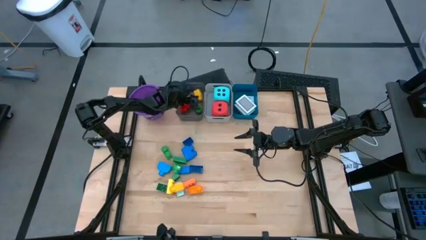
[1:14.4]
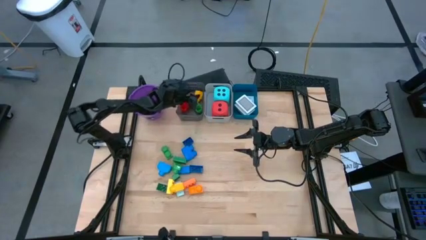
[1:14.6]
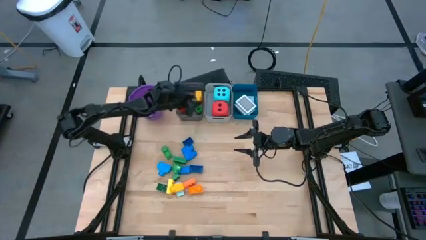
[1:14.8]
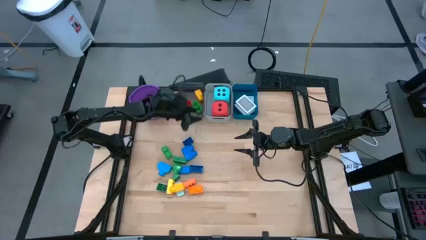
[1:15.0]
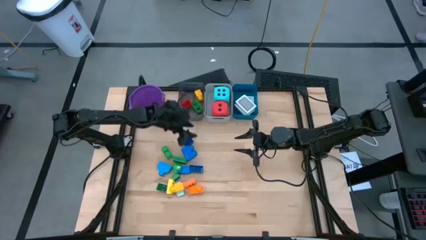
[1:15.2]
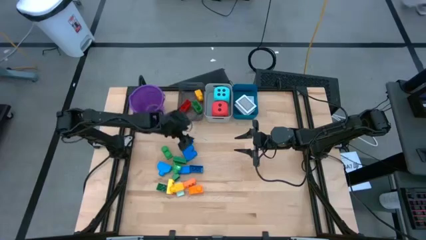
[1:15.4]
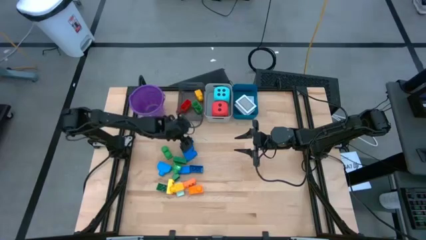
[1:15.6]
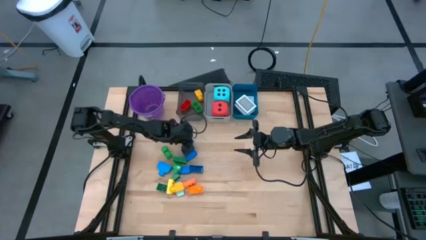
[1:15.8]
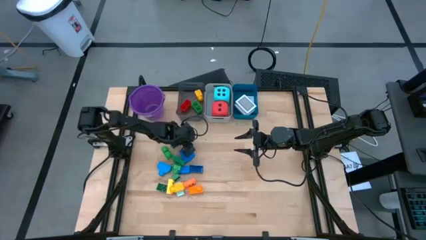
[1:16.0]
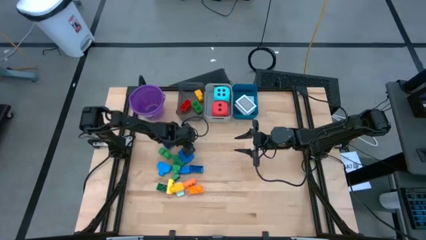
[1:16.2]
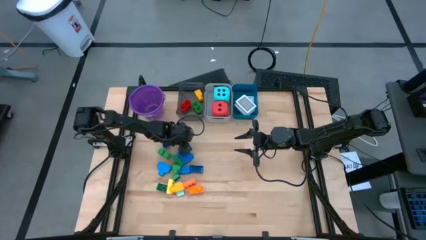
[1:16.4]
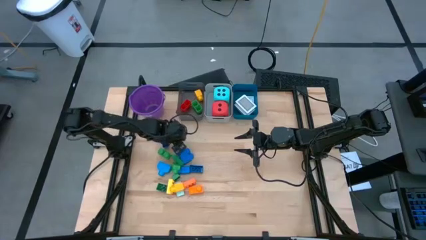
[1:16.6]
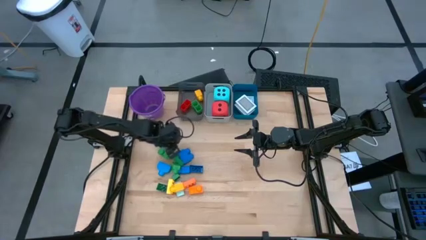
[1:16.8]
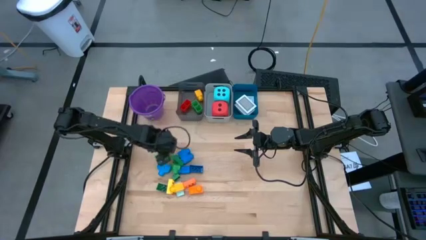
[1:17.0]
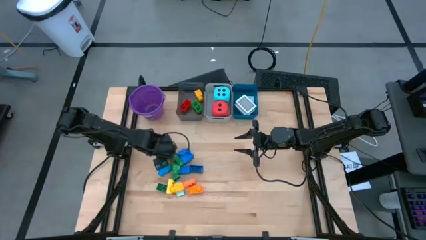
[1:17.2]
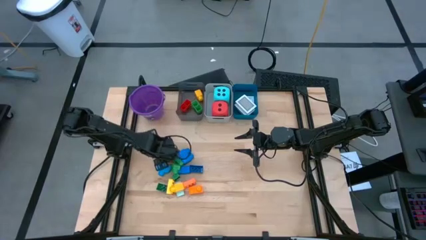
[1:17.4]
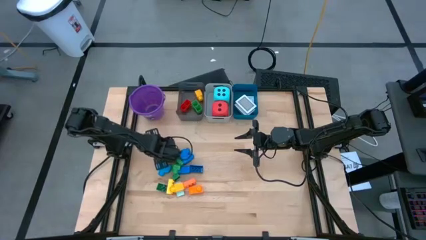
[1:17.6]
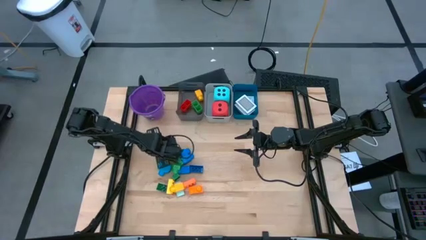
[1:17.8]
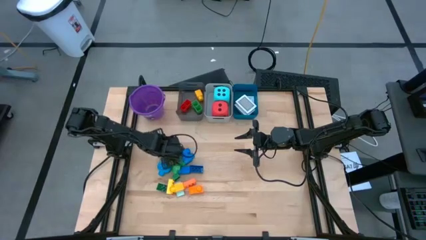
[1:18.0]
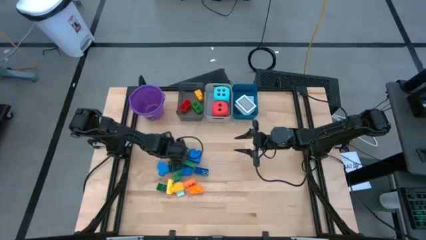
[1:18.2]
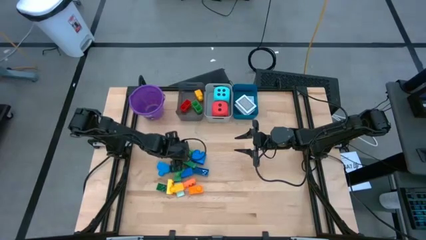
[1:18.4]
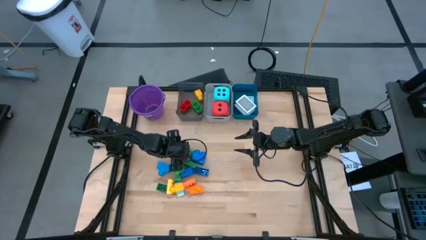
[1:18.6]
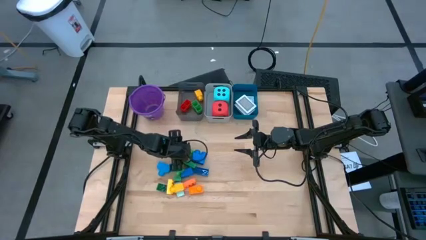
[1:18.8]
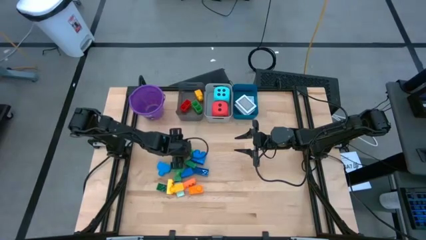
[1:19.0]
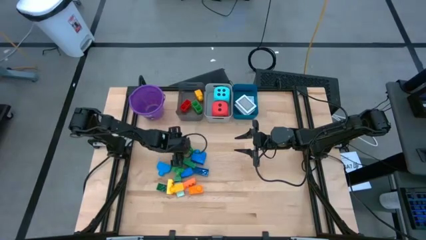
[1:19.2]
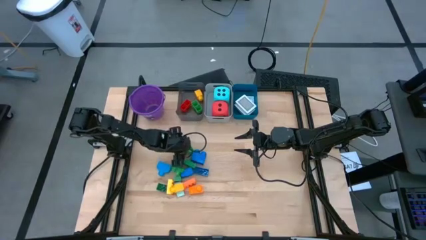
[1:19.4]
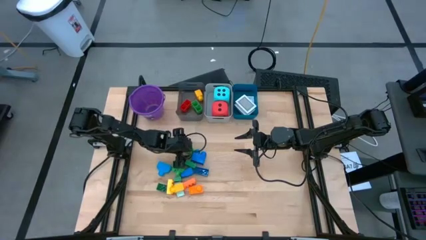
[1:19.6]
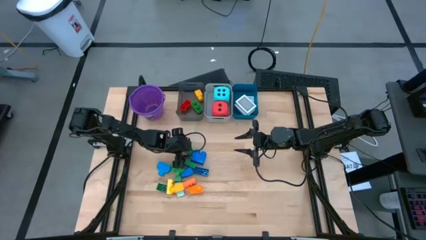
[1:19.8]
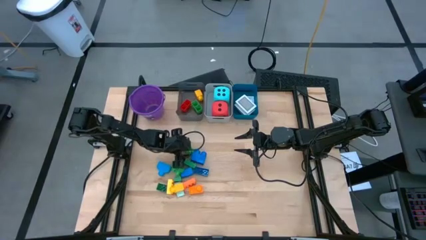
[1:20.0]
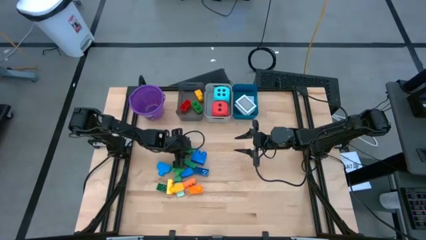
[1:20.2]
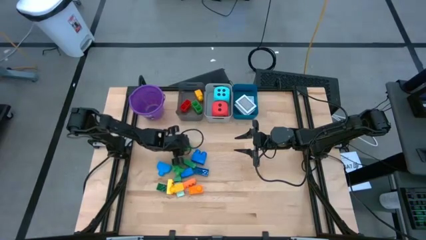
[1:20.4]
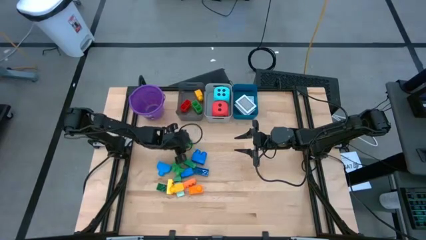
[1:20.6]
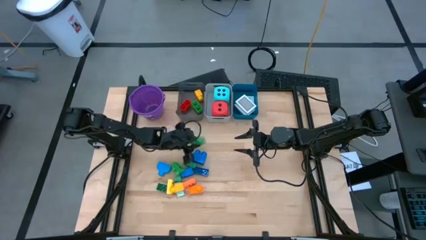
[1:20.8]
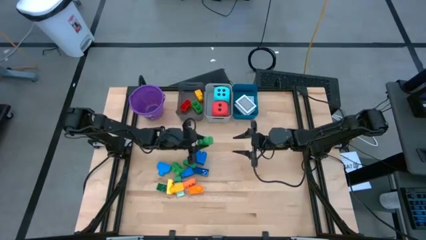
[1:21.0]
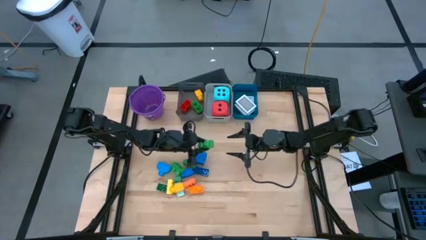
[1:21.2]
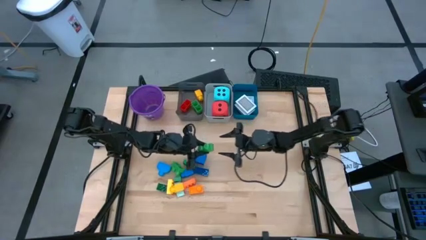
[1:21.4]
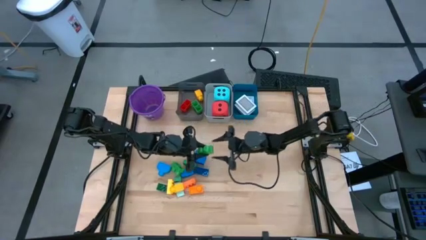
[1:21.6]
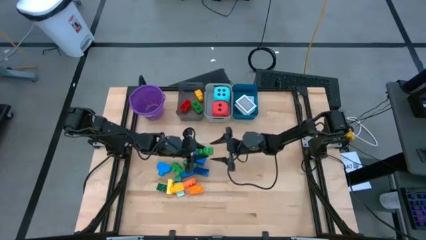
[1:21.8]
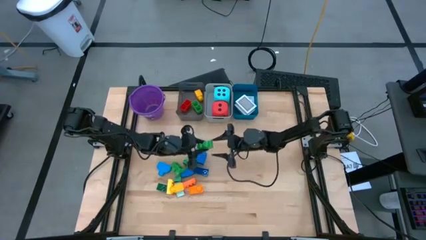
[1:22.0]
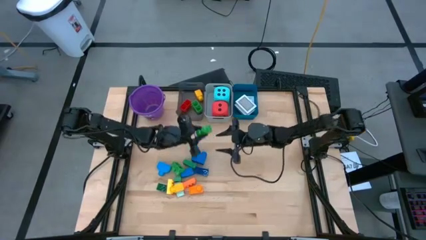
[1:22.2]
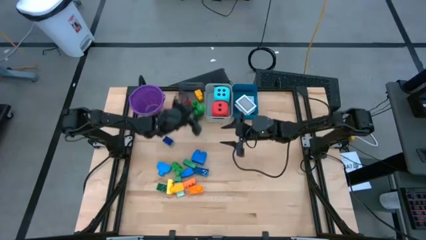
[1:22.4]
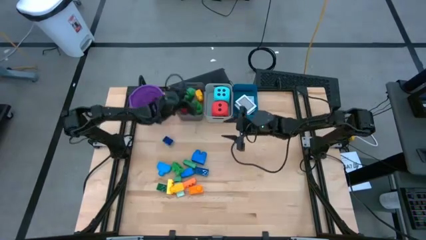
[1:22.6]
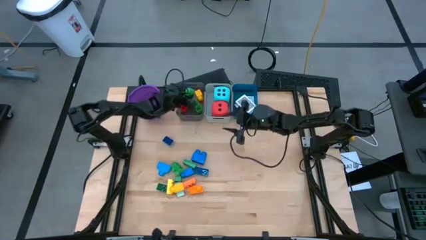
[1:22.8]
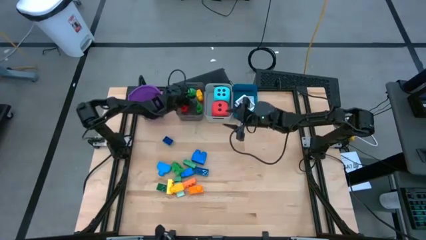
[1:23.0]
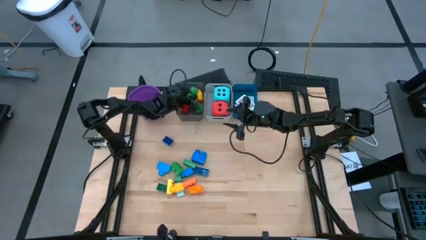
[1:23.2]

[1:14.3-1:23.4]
Task: Pick & Place Toys
Put the green game piece into the black bin

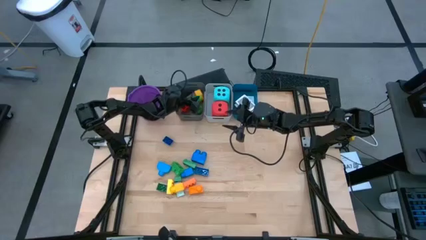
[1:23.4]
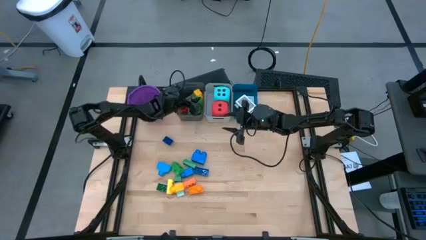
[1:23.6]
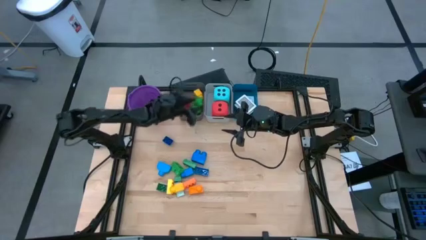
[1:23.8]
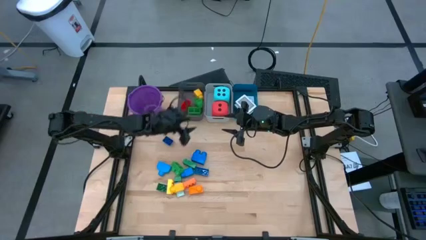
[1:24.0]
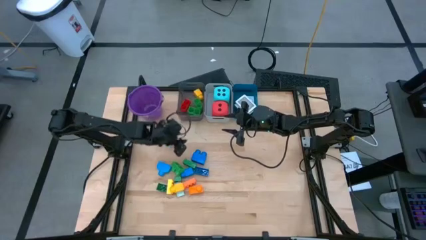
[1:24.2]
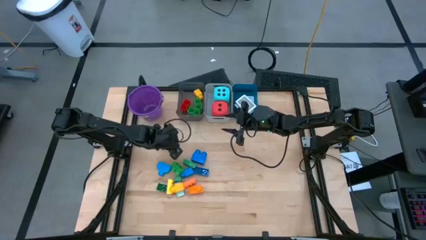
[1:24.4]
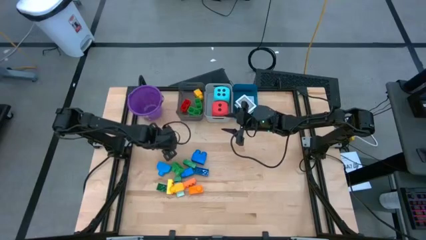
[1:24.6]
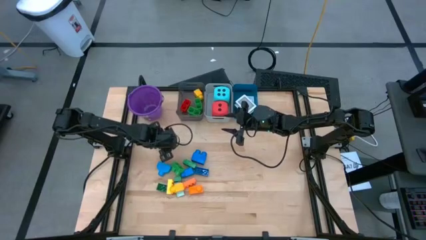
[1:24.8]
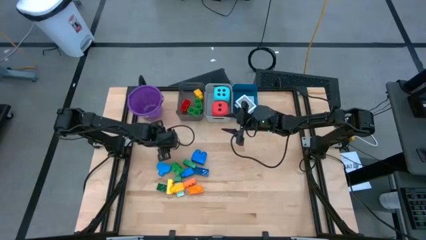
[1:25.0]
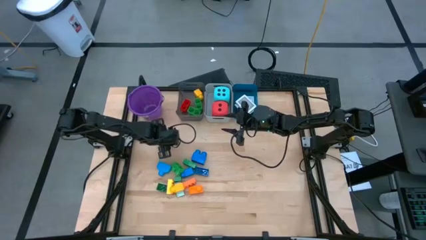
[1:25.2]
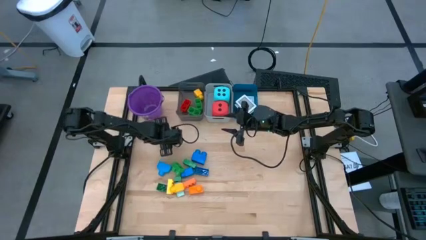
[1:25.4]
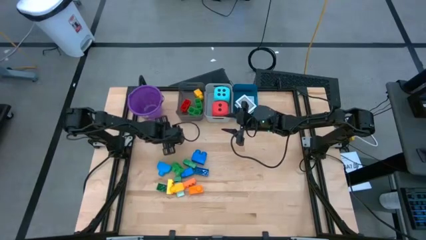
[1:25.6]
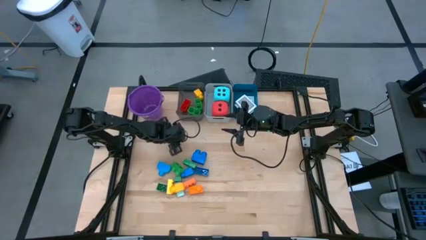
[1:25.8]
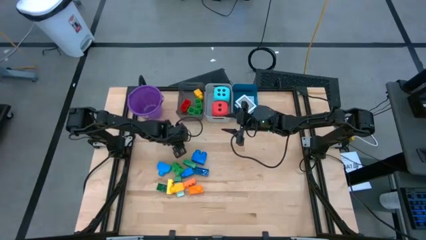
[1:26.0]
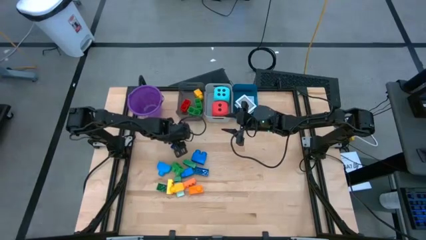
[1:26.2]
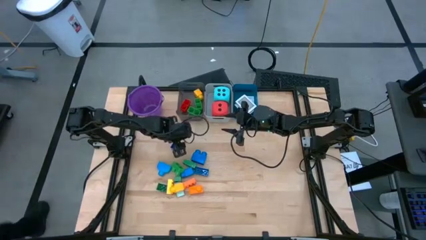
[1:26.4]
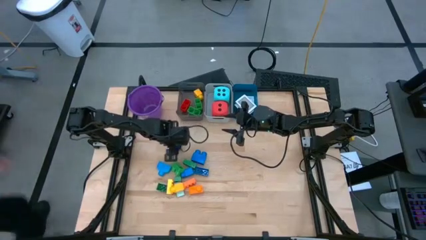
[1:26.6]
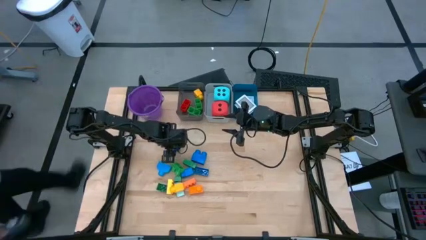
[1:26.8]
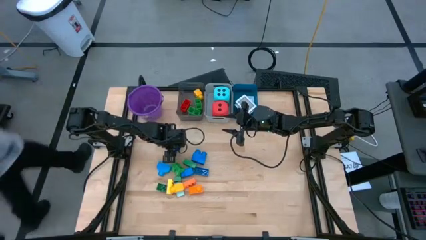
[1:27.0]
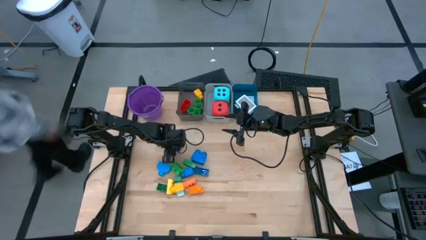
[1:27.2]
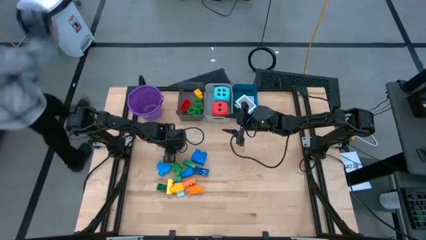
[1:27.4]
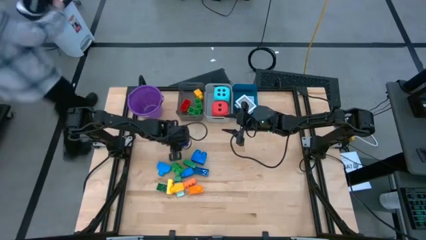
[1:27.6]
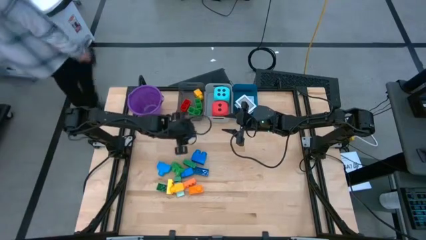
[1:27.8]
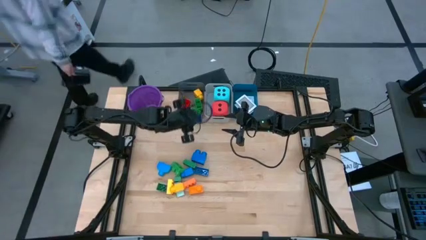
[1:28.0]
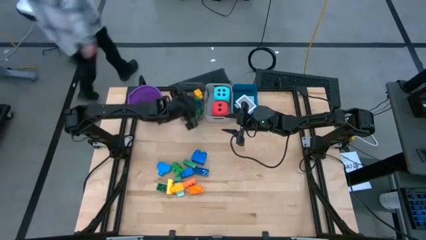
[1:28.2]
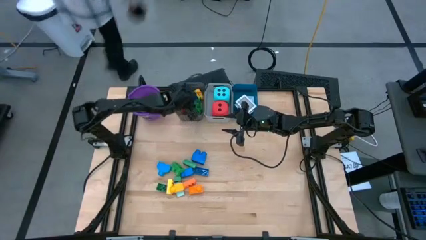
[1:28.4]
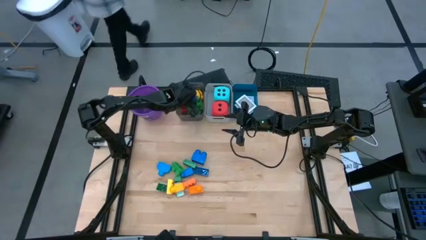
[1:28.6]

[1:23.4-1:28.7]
Put the blue game piece into the black bin

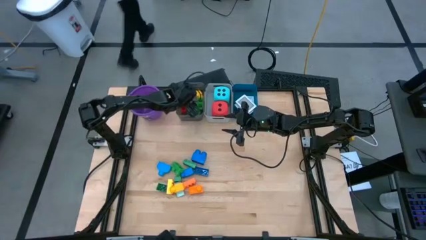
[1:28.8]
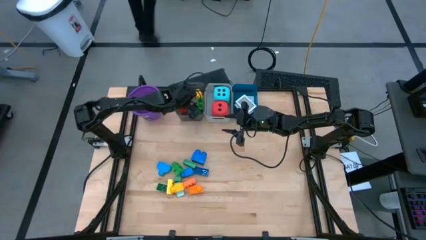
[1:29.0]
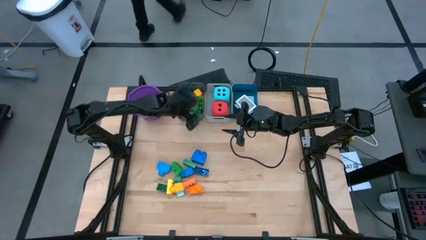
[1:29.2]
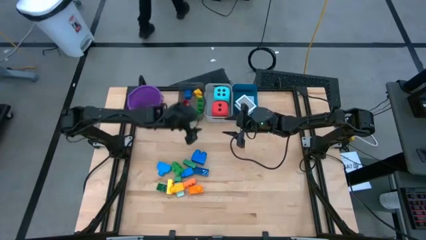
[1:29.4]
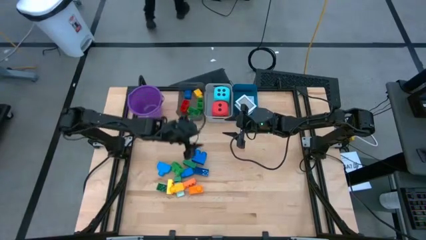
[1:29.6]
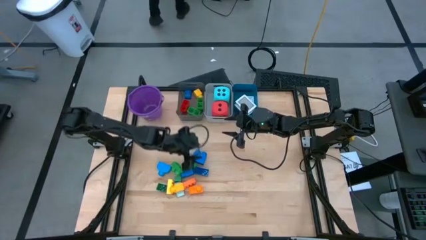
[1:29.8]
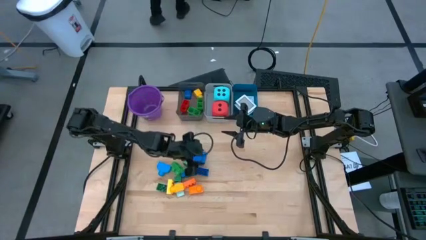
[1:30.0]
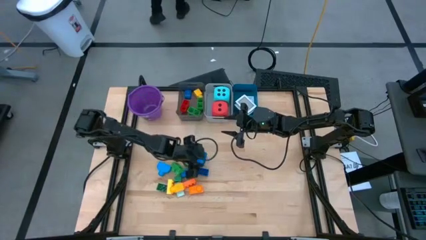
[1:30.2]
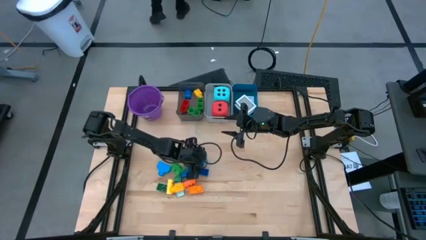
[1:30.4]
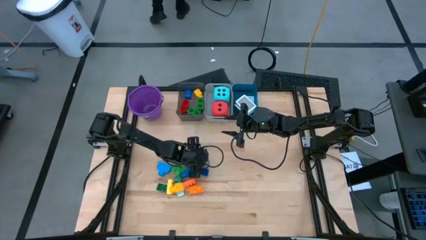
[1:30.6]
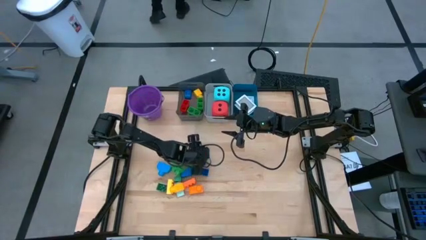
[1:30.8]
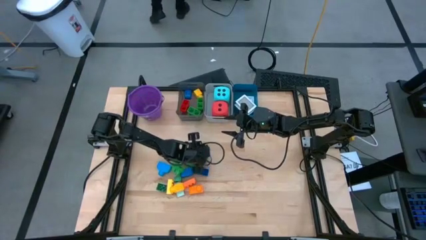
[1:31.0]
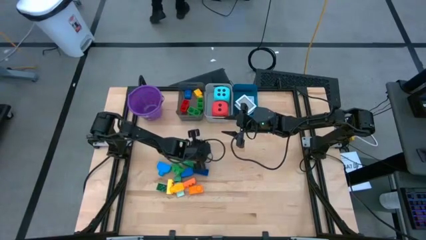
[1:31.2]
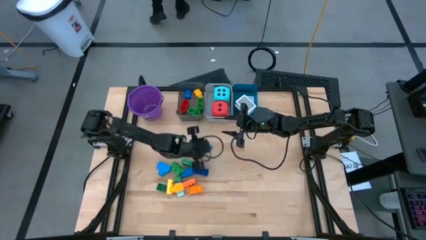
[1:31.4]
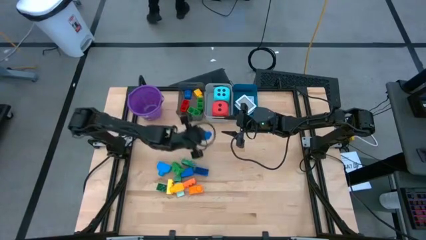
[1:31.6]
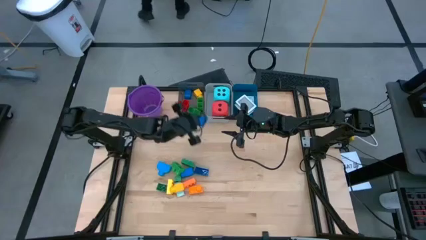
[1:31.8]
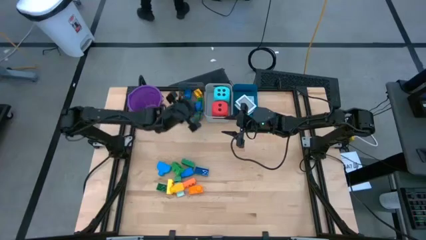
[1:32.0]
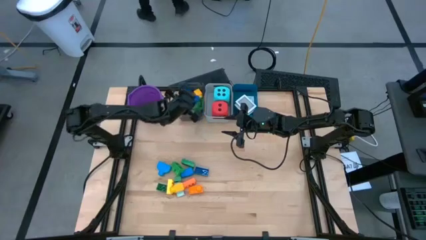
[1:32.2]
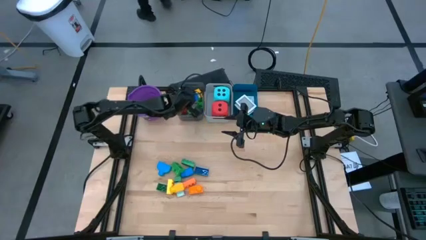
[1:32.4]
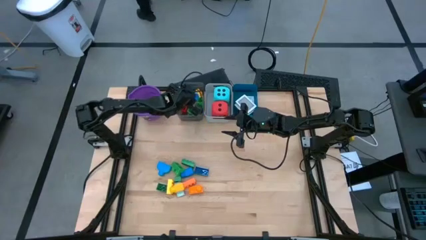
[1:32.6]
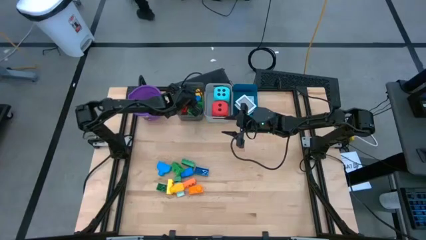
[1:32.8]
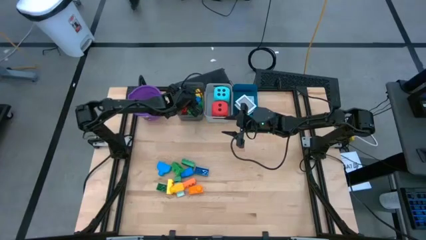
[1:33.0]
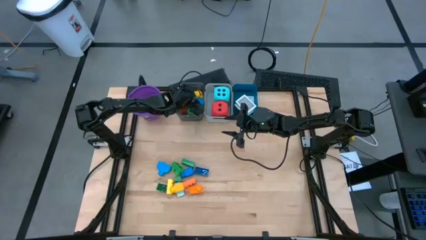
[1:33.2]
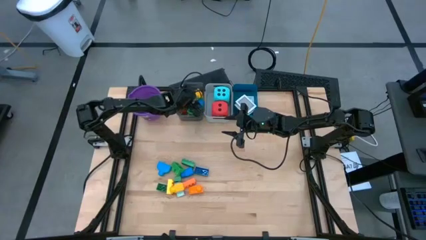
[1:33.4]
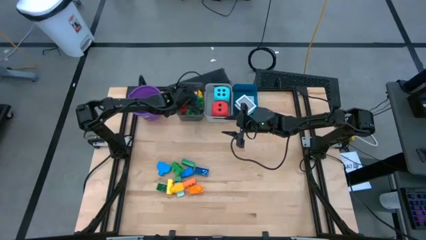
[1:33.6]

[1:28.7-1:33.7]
Put the blue game piece into the black bin
